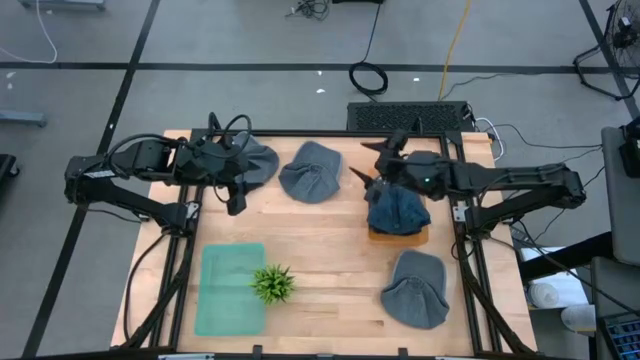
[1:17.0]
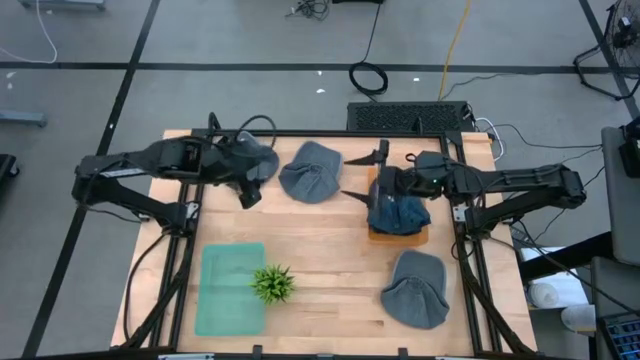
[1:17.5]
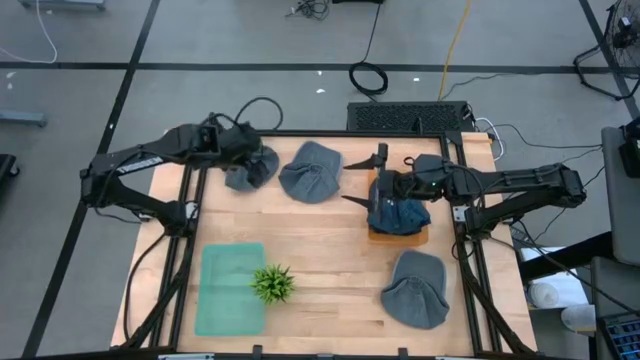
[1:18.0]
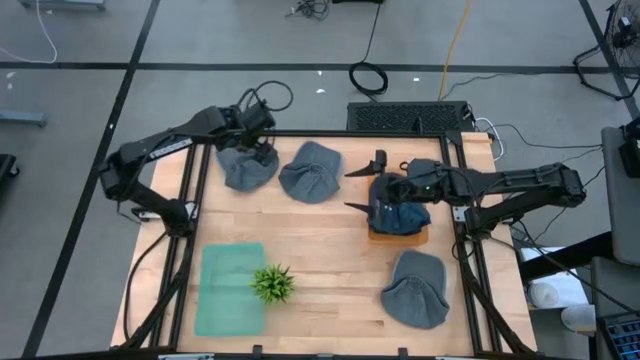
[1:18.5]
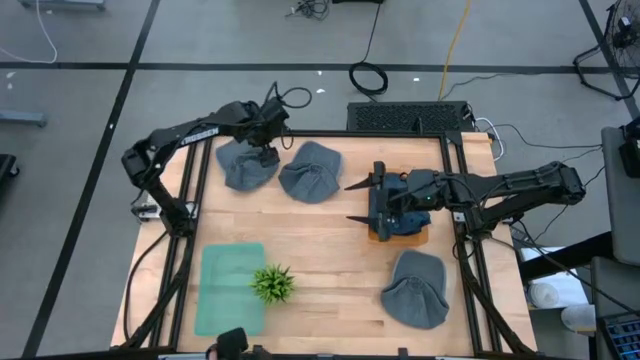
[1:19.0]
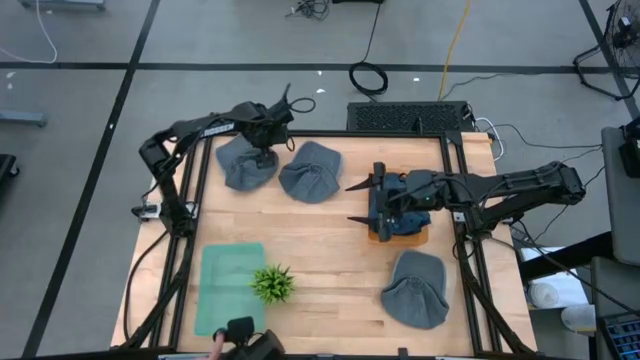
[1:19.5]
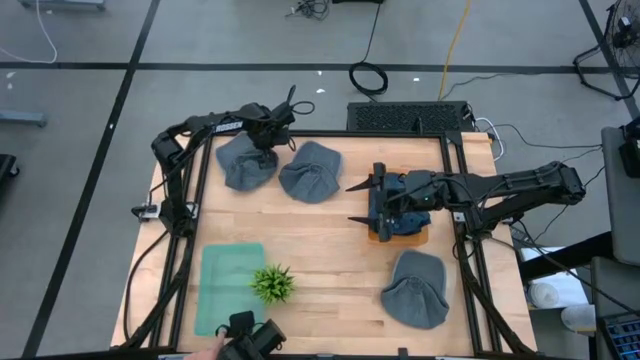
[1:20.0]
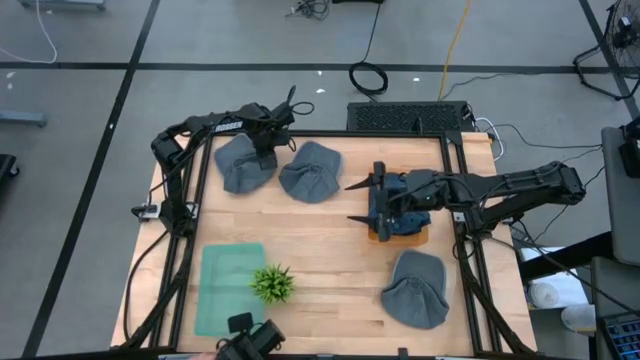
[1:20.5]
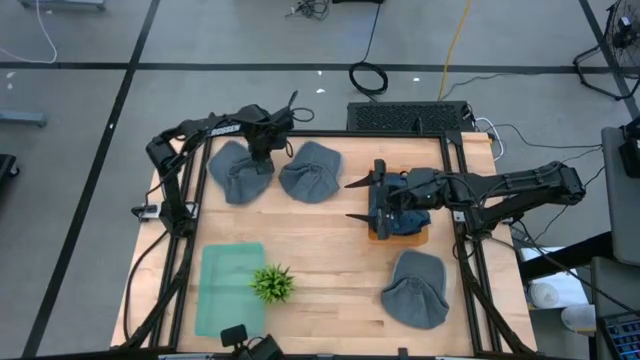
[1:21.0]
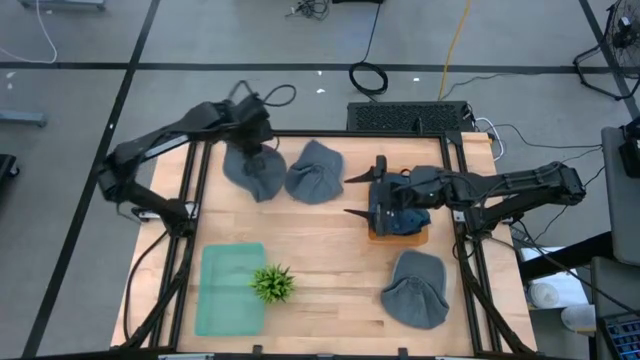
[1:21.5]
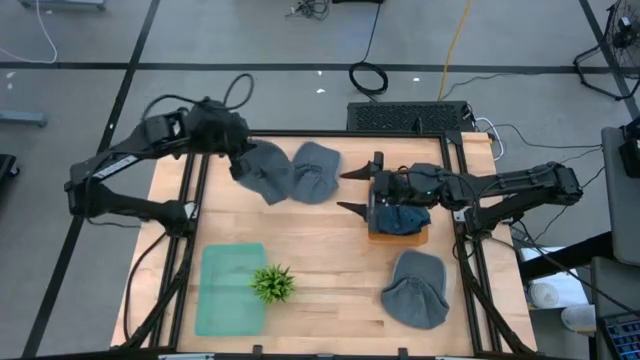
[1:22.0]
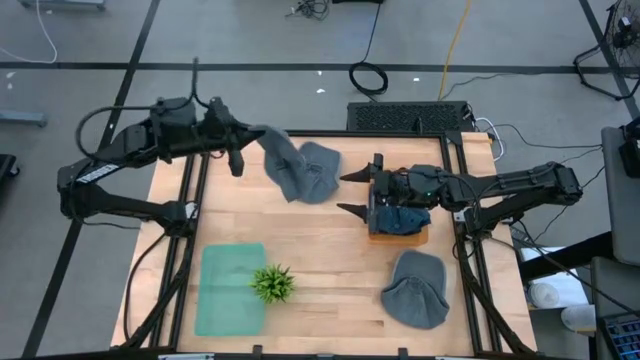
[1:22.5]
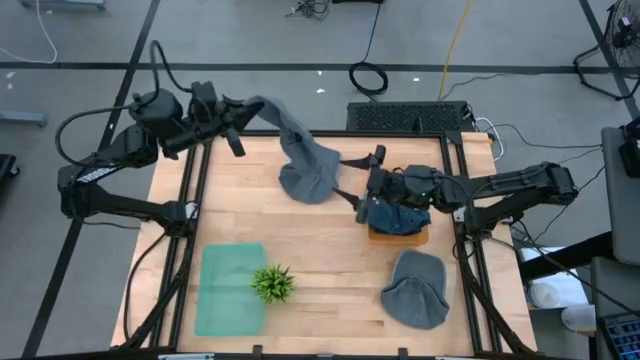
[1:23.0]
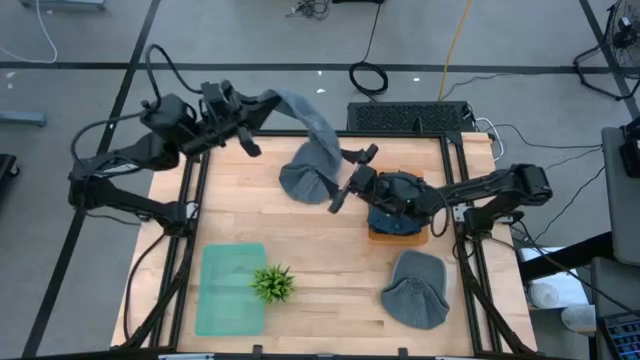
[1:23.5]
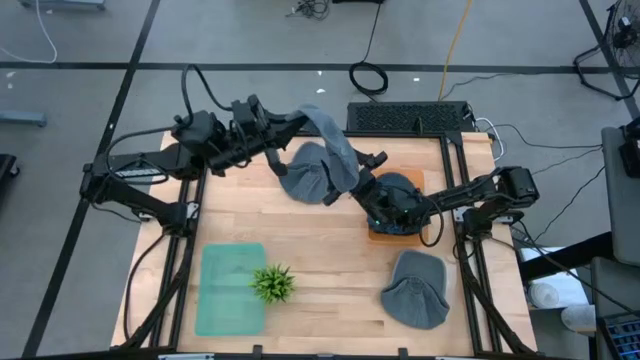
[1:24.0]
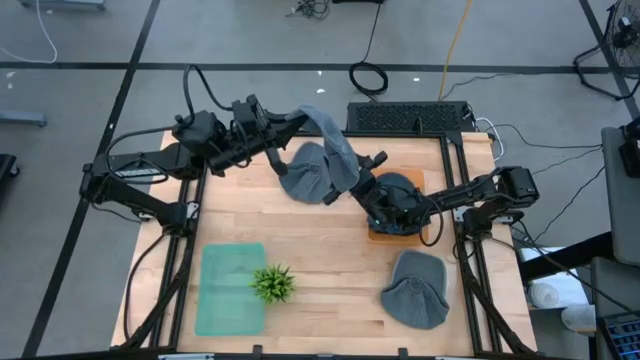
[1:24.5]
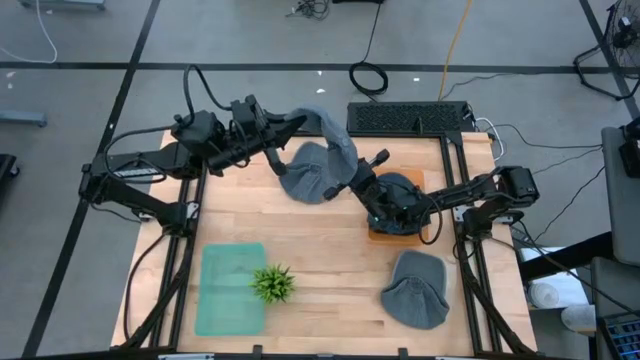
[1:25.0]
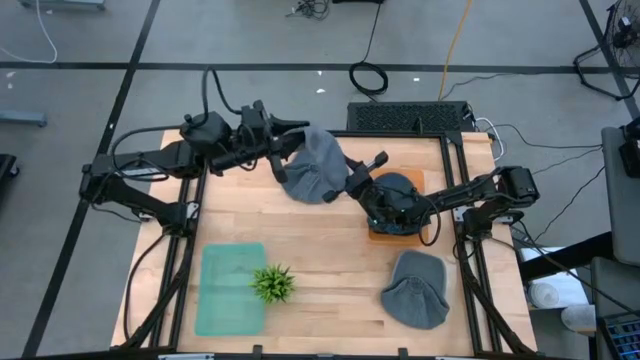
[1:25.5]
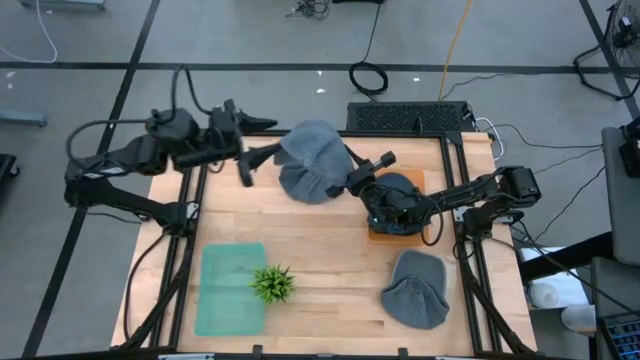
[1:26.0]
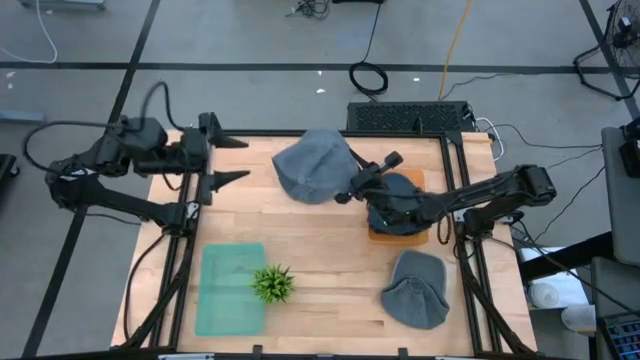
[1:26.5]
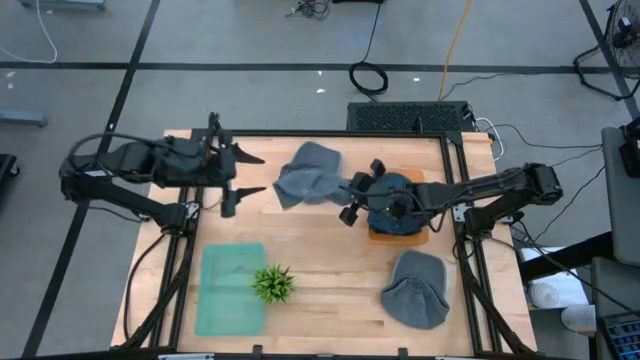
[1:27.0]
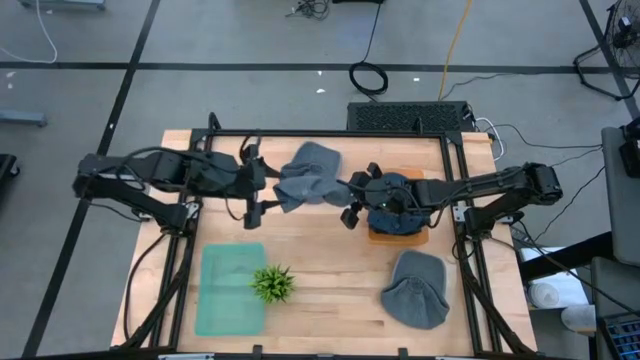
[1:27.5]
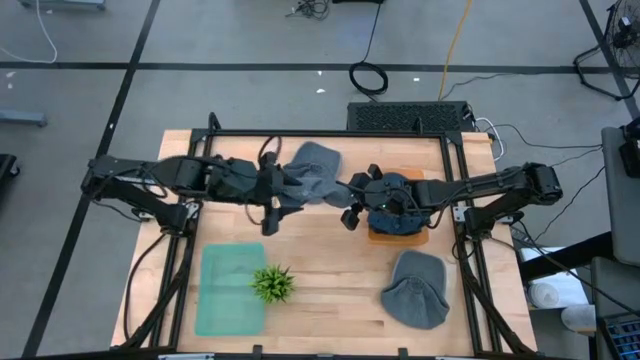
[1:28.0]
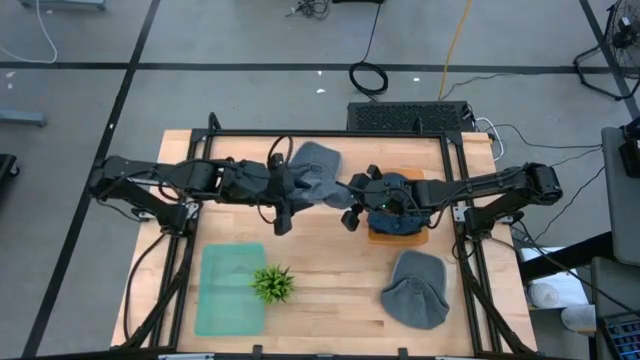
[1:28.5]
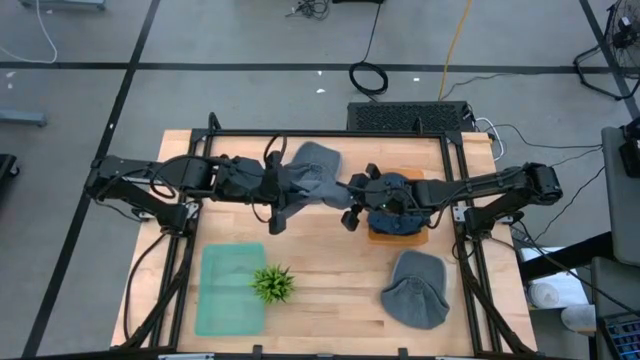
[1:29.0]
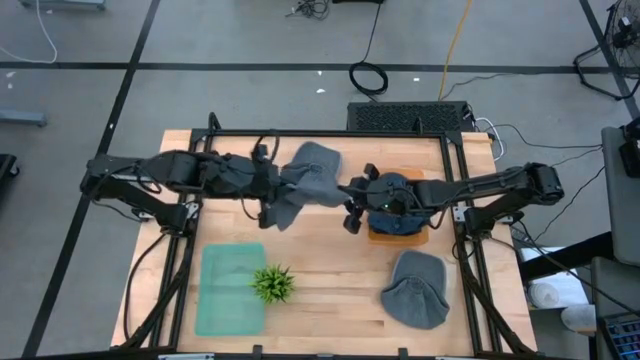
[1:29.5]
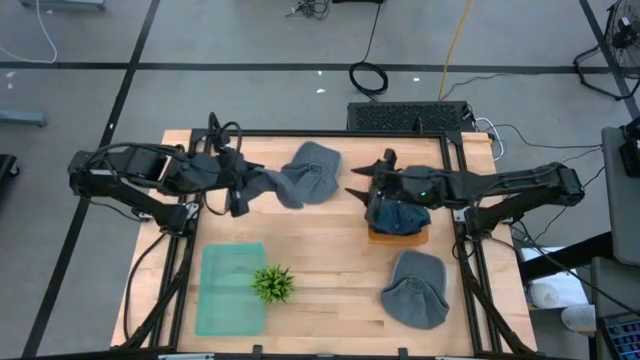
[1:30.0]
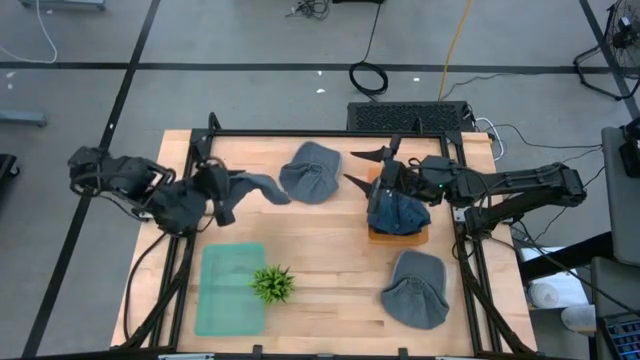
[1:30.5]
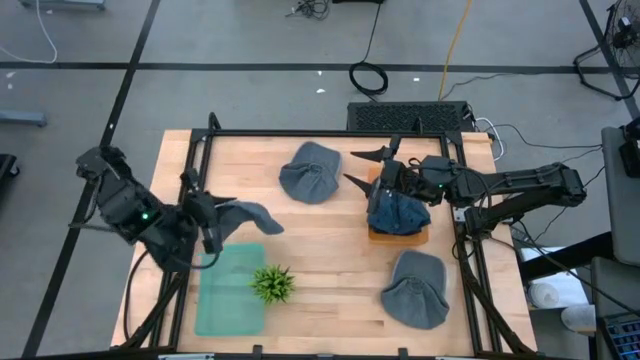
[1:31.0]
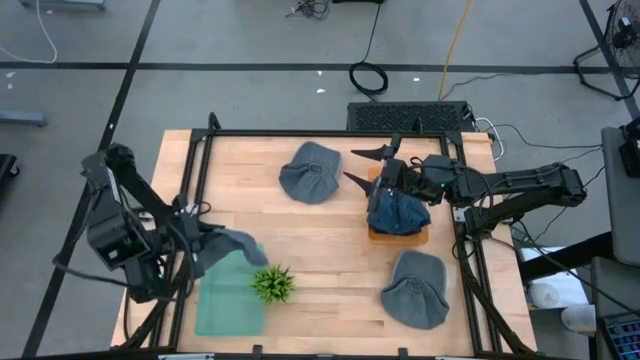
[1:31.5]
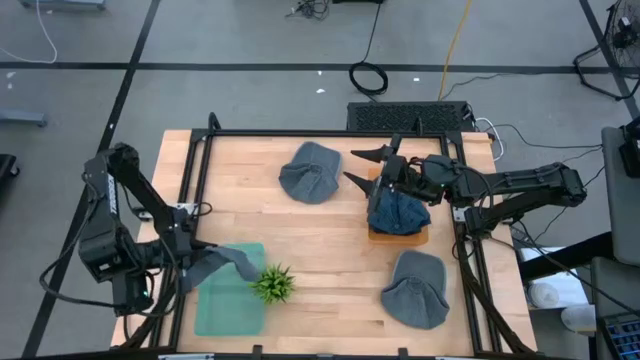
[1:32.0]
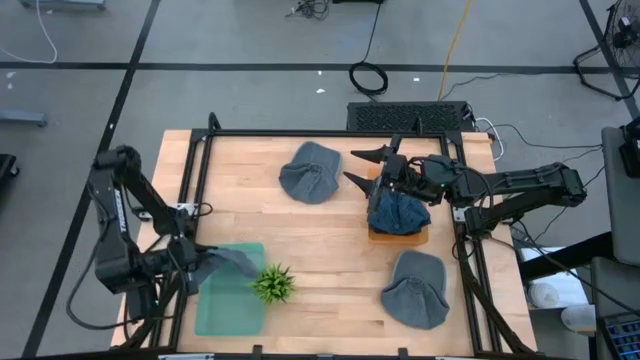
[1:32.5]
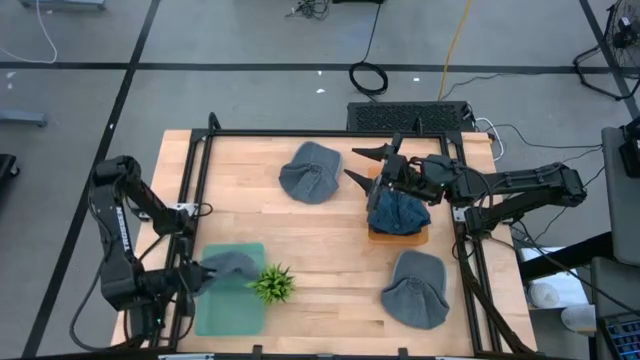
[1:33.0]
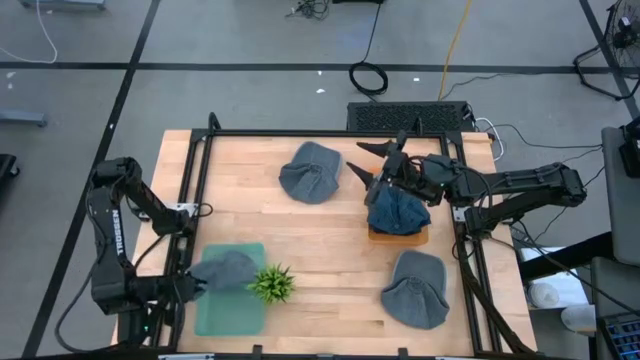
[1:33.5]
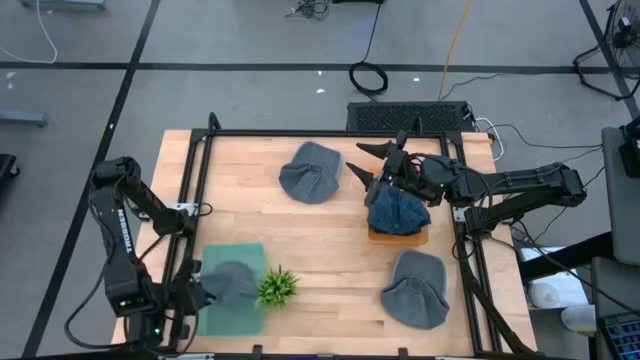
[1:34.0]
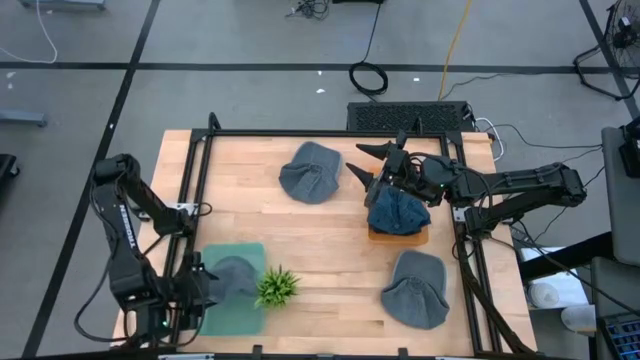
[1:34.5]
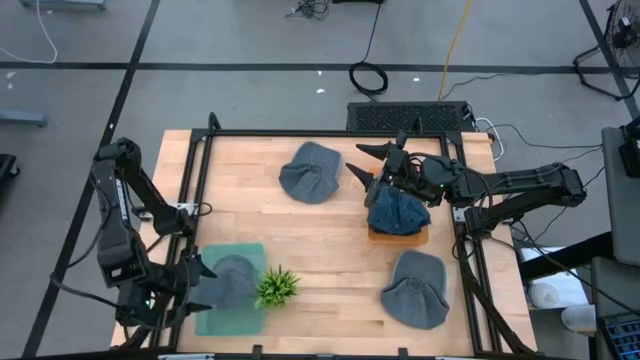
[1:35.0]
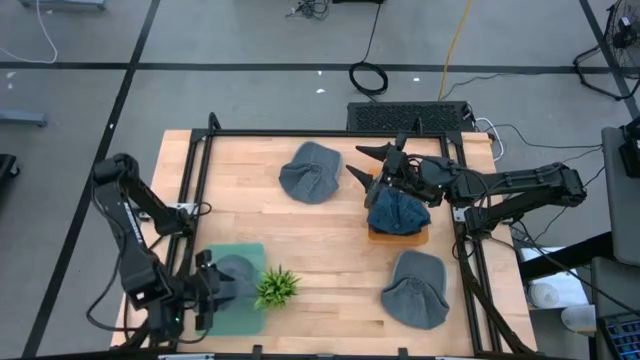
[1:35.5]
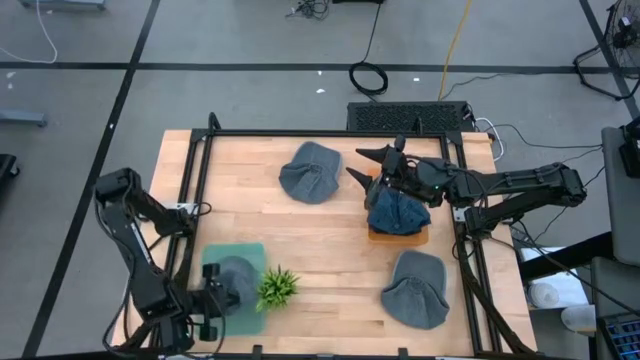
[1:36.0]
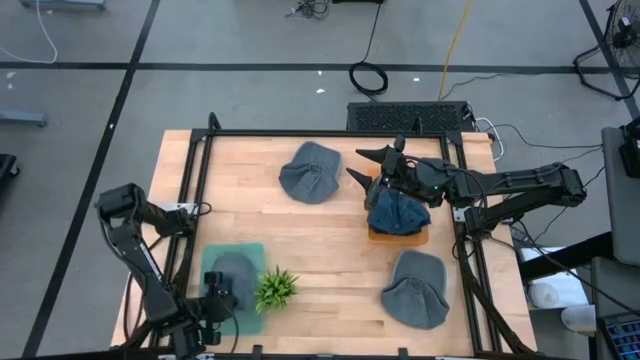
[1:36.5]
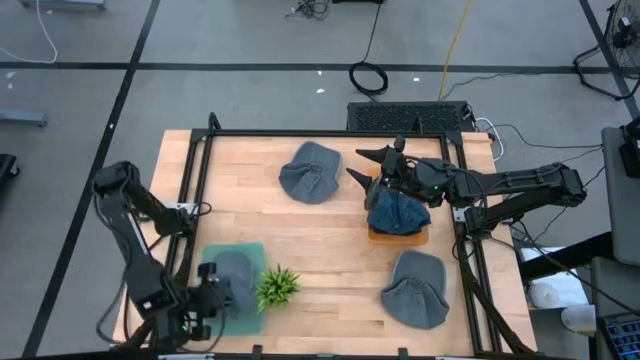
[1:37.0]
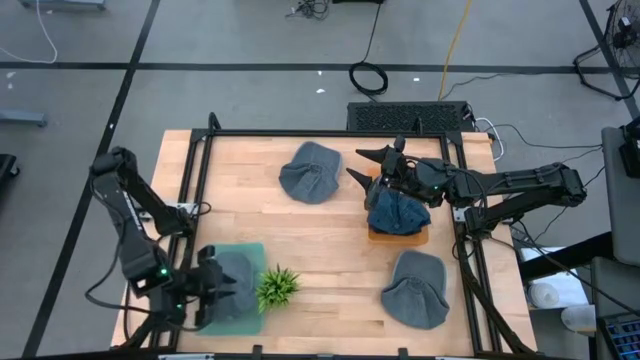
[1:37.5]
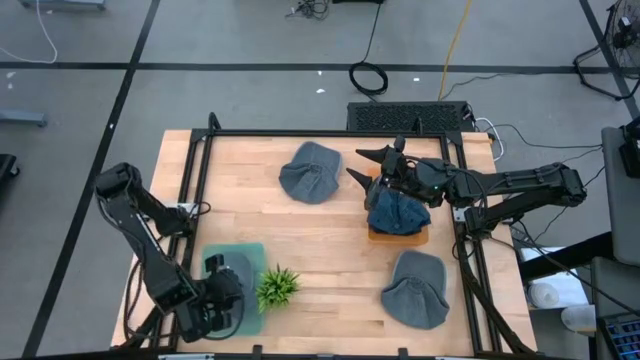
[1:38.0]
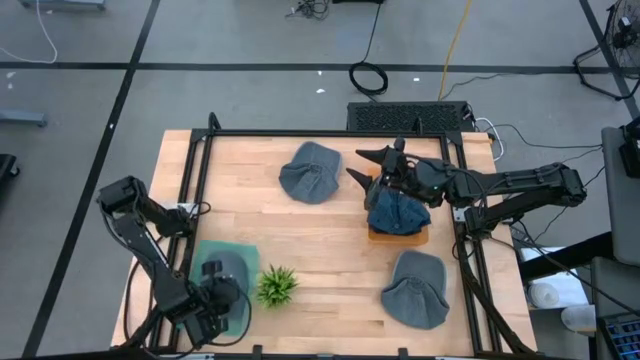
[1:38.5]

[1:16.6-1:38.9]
Task: Pick & Place hat
Put the top left gray cap into the green bin
